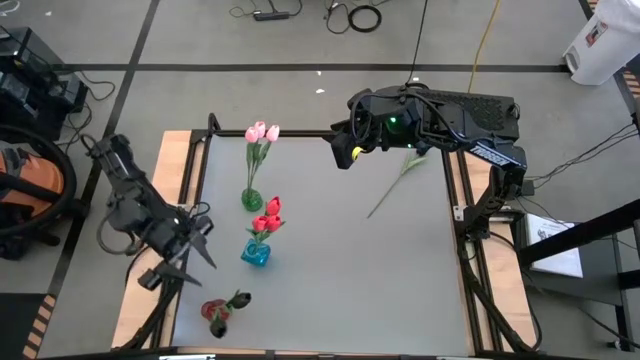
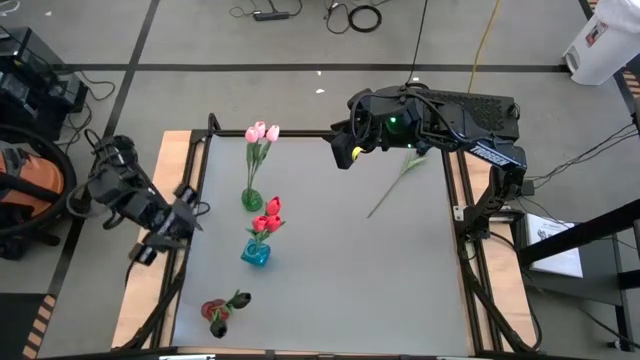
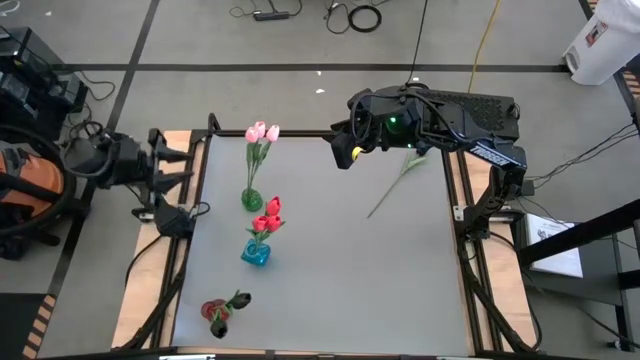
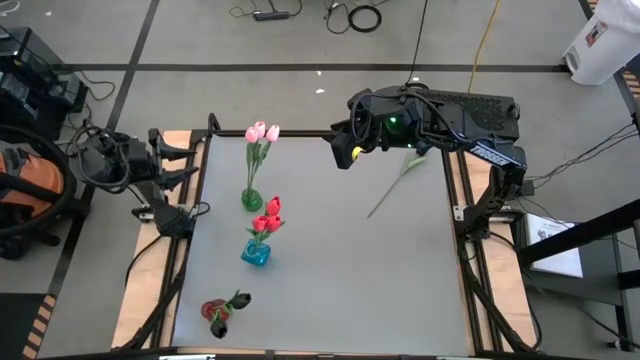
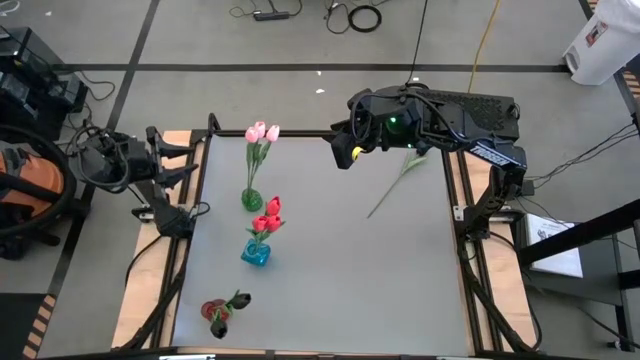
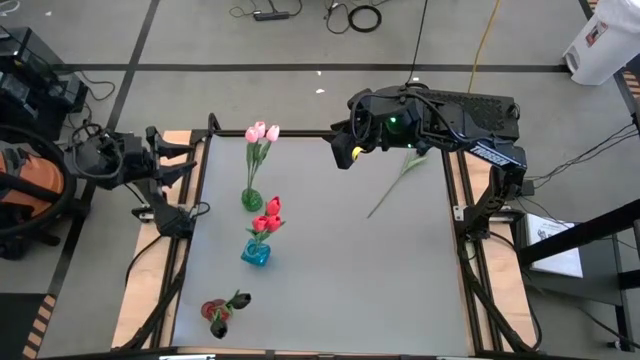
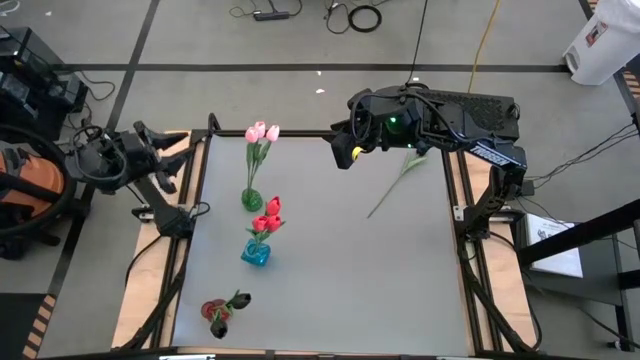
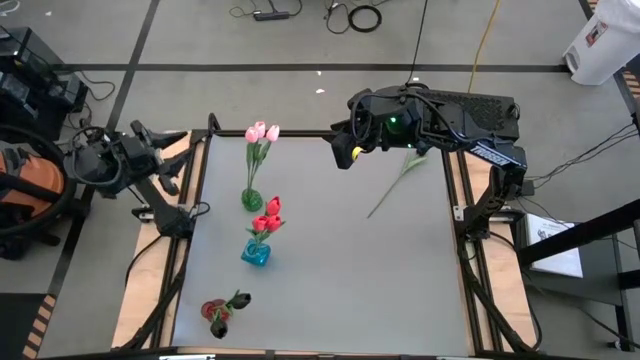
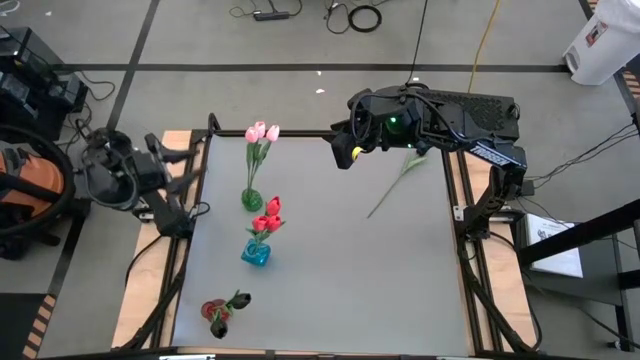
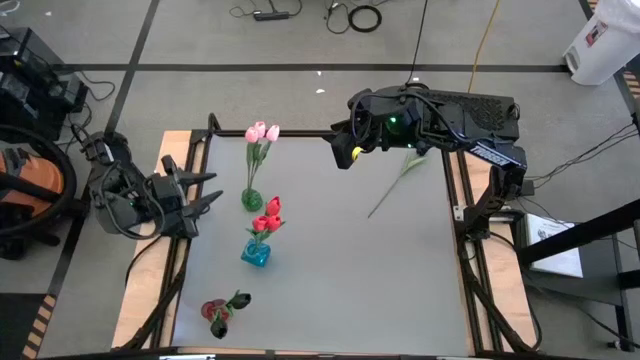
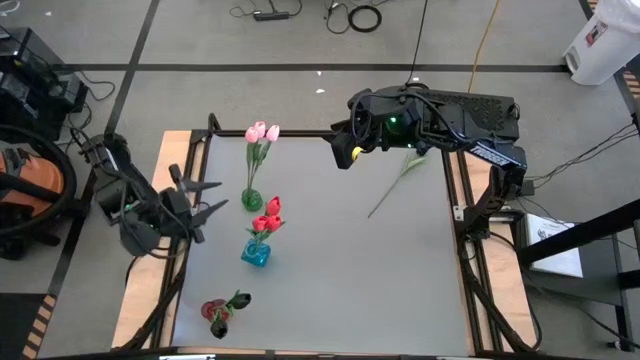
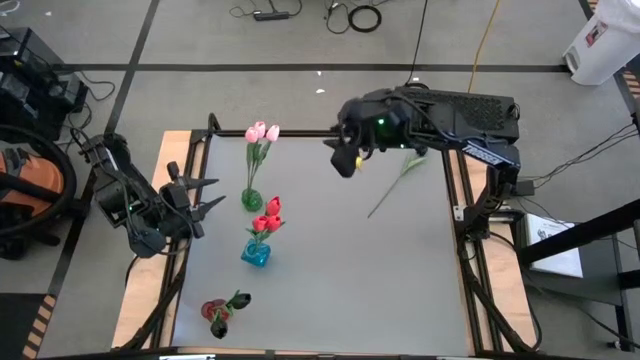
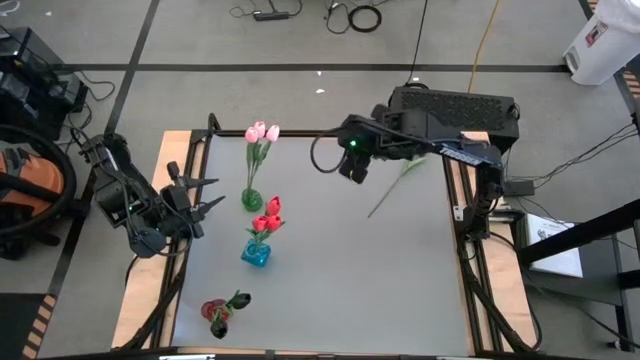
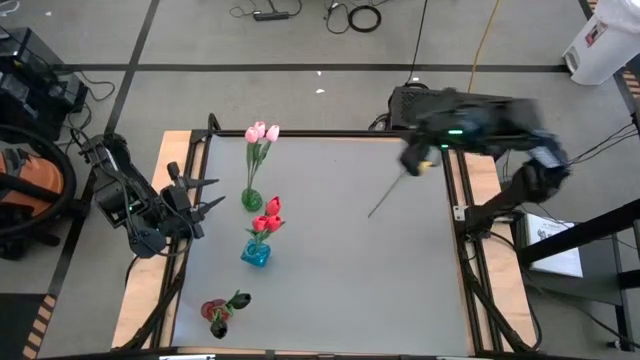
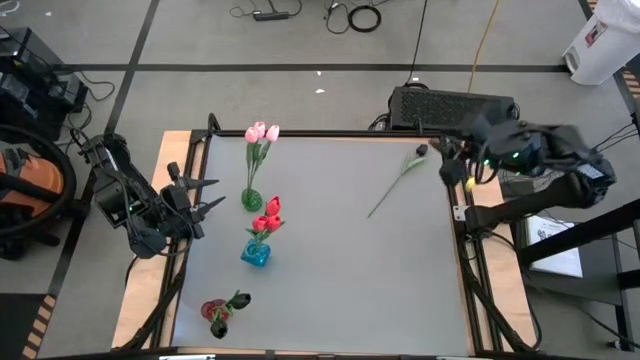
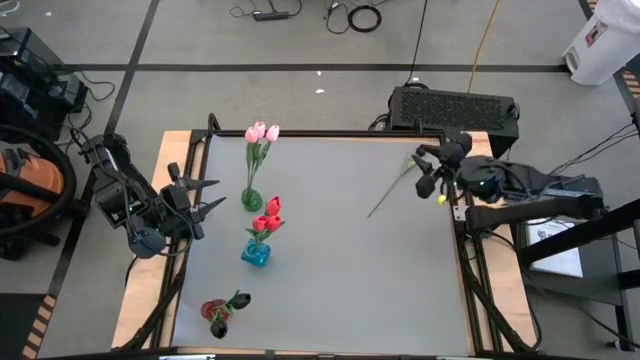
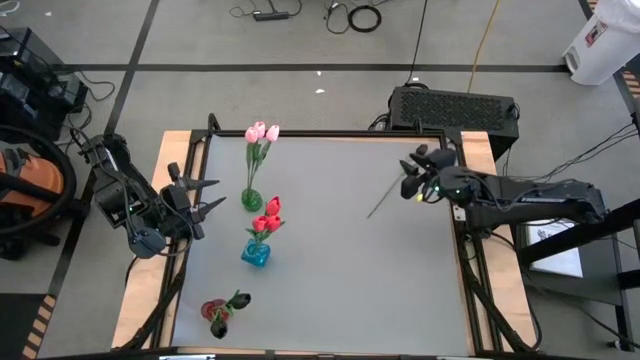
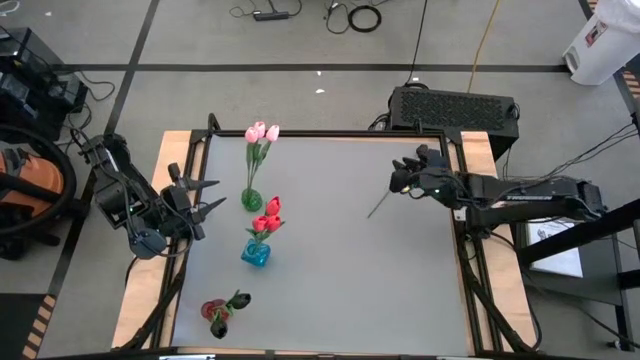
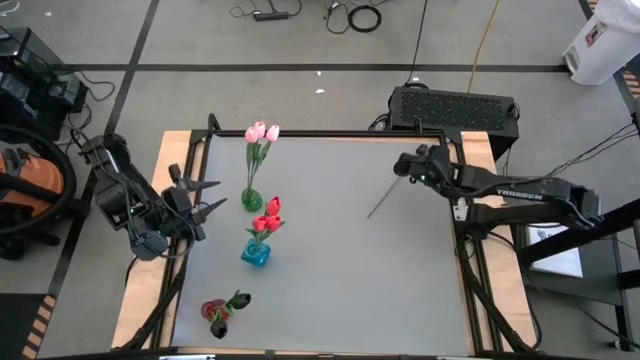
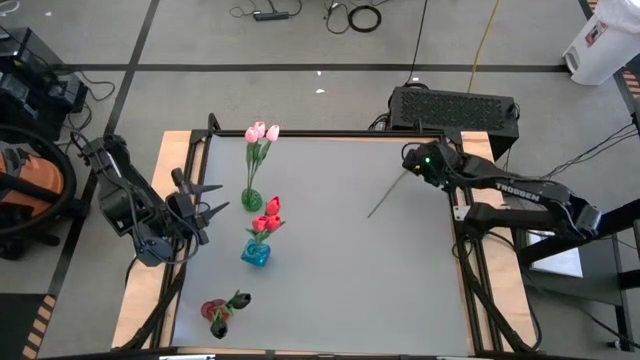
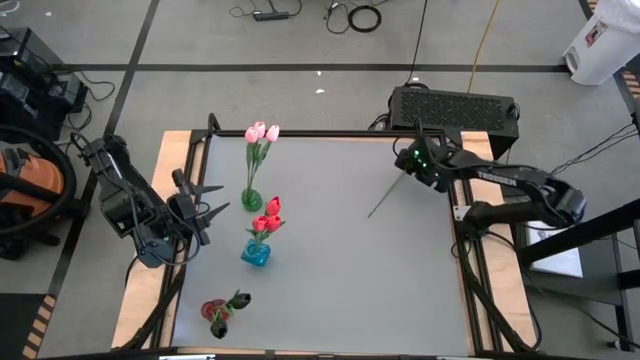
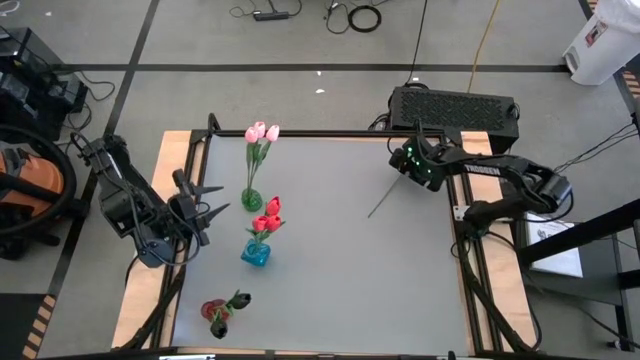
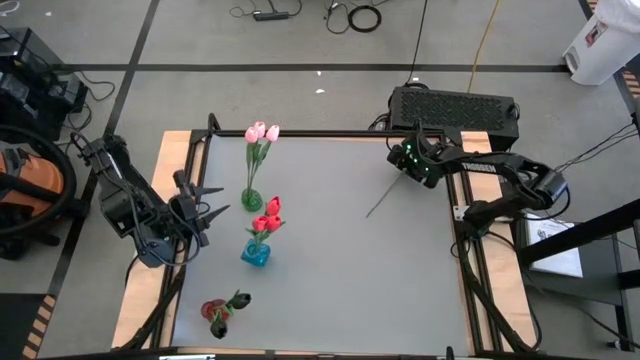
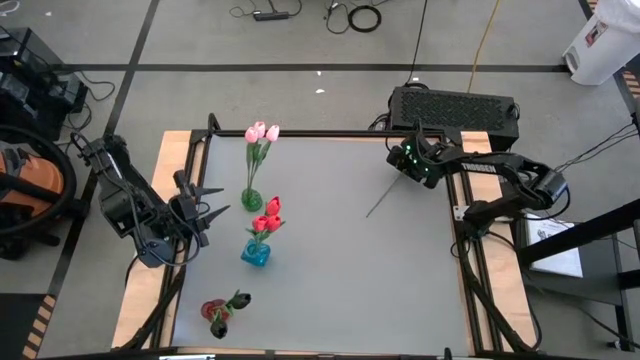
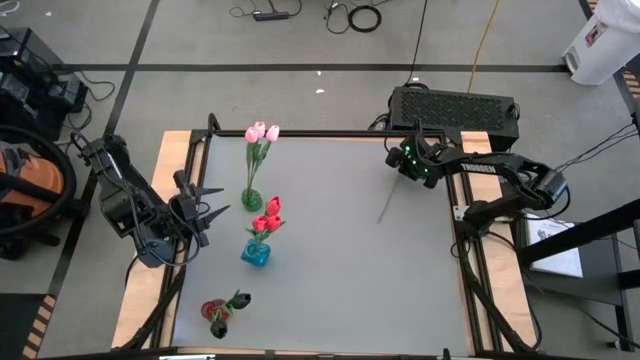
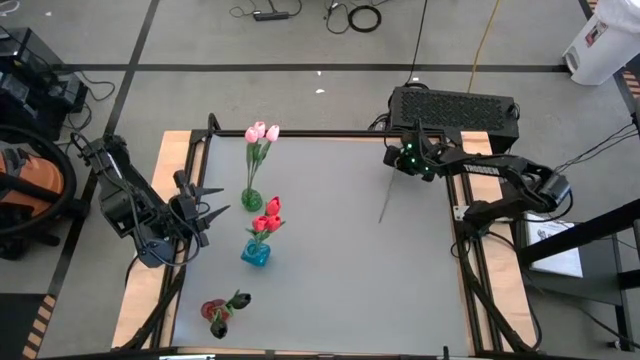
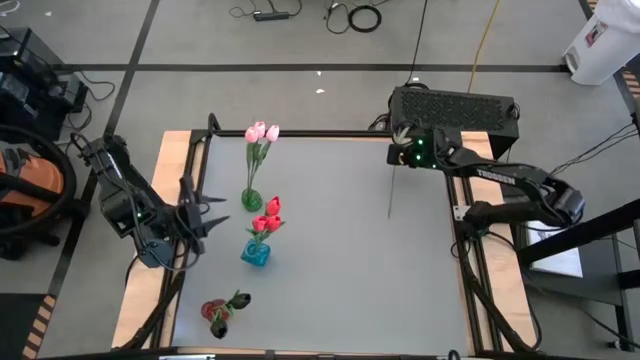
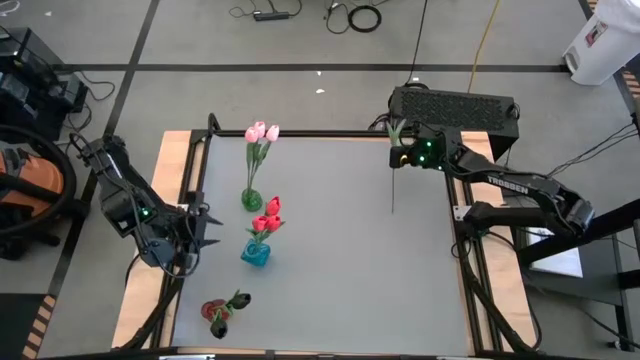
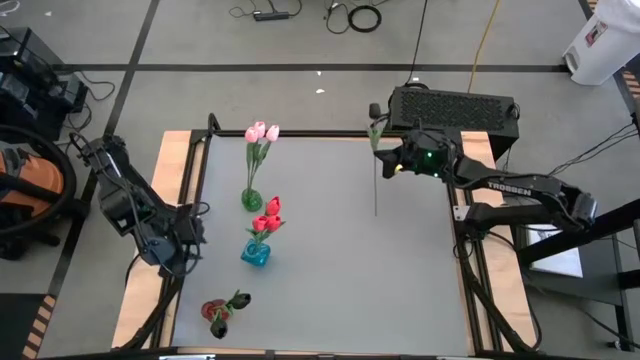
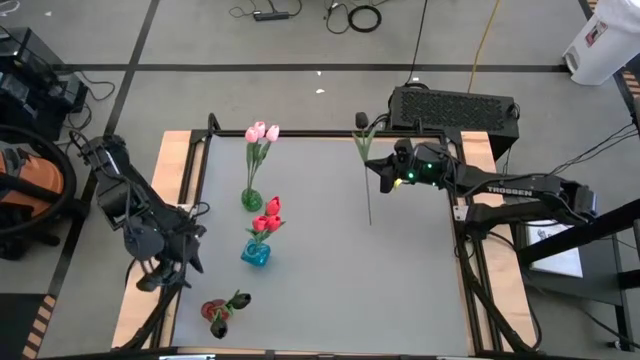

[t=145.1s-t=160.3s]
Task: Sort flowers into vase by color
Put the black flower into the red vase

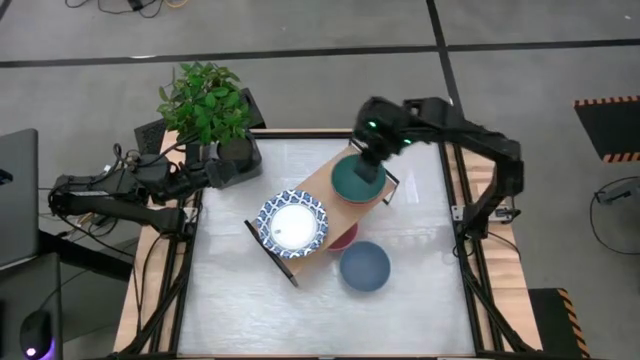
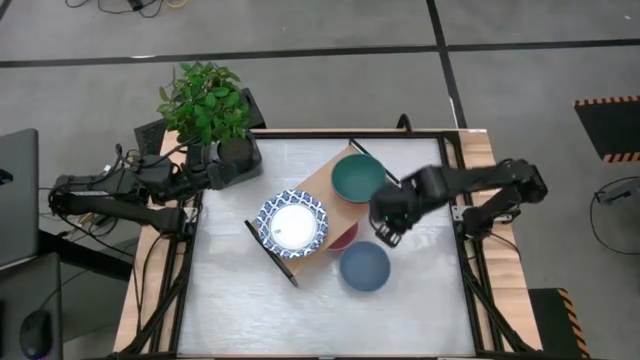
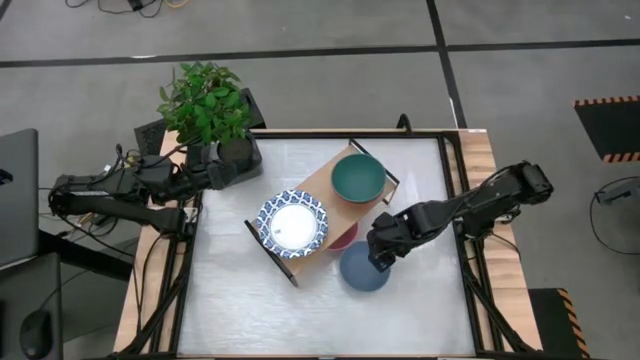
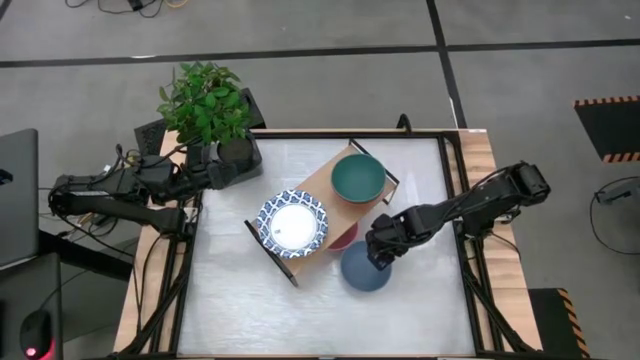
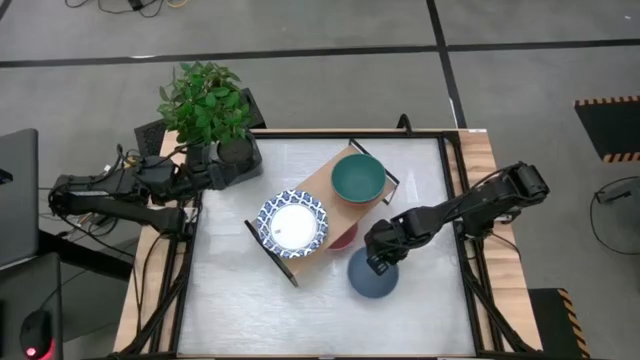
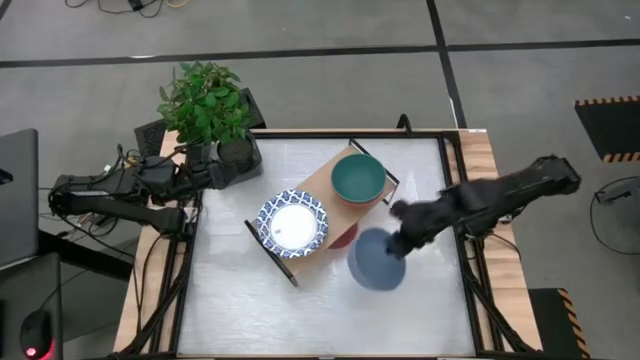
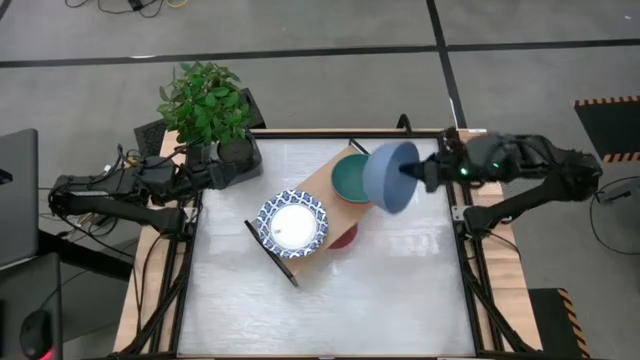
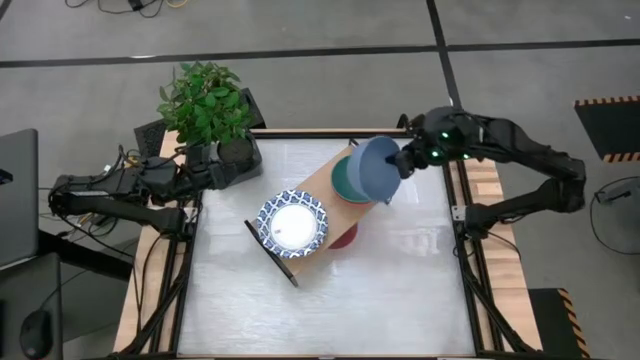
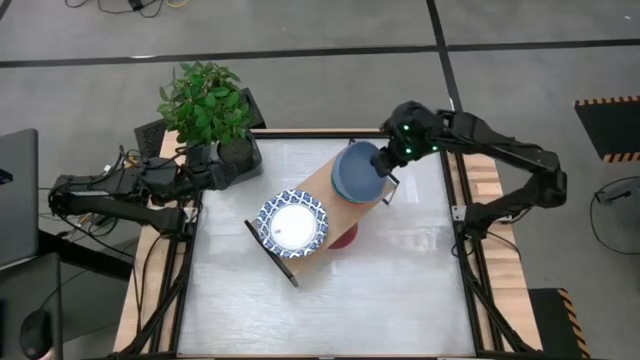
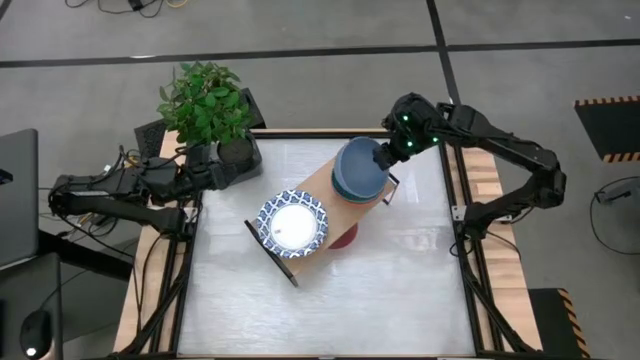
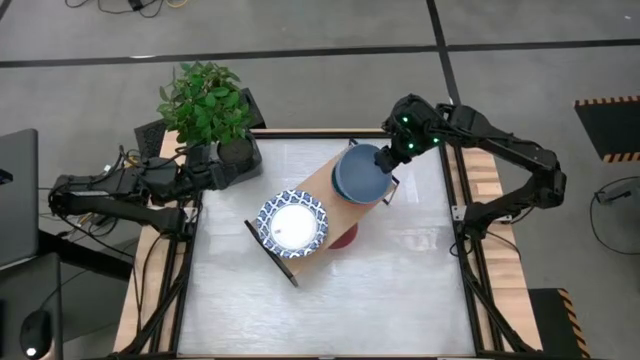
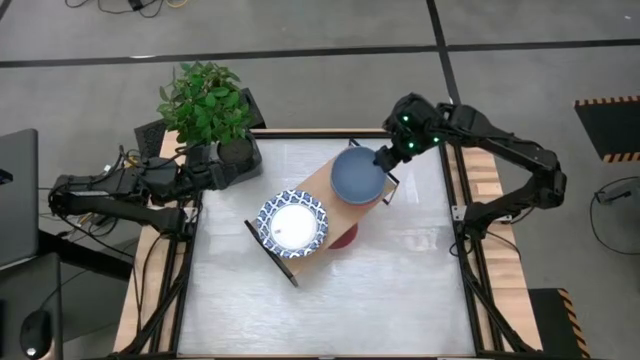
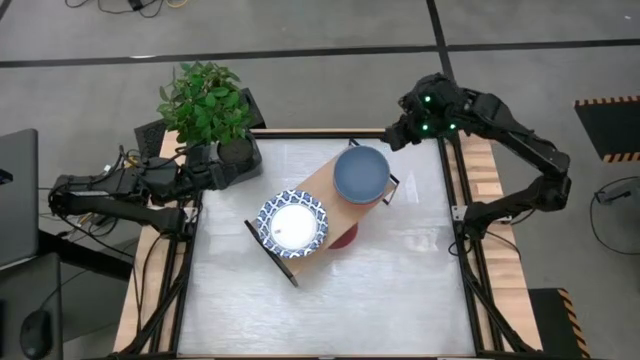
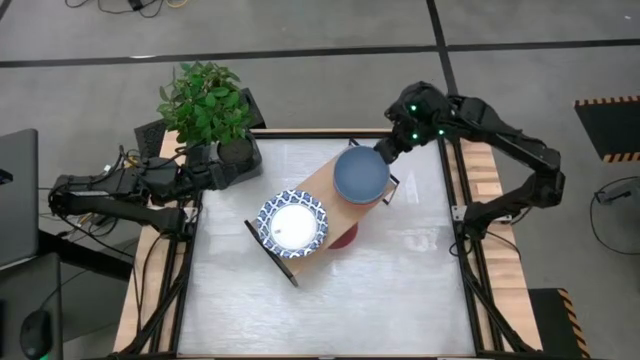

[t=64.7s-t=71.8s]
Task: Place and stack bowls onto a shelf
Stack the light blue bowl on top of the green bowl on the shelf

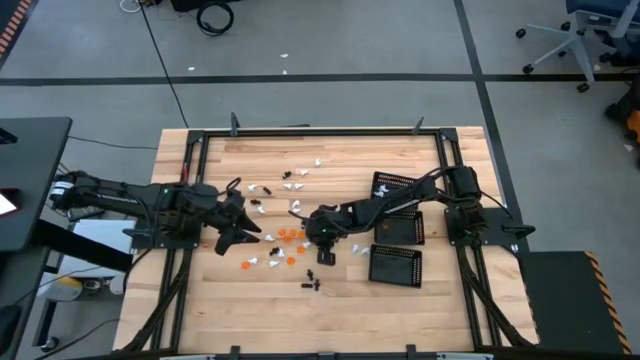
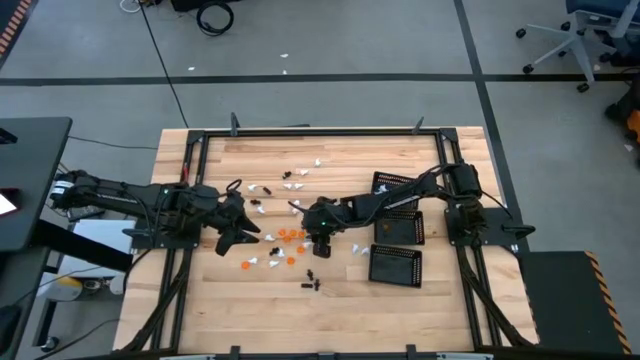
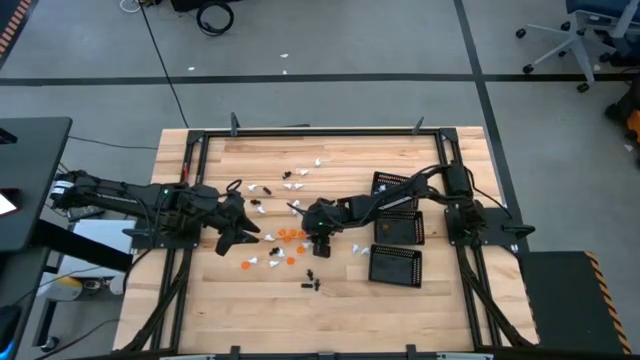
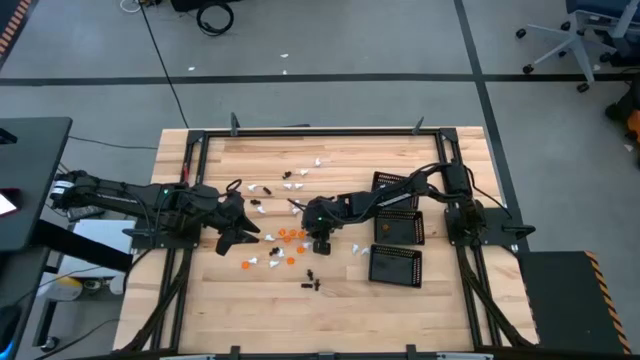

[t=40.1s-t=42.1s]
Task: Sort Halloween decoration
Put the white ghost toy into the top black bin
